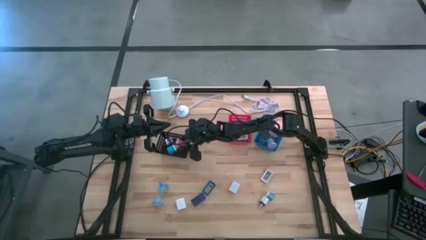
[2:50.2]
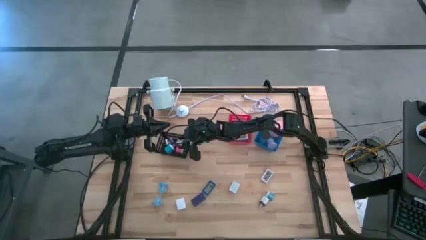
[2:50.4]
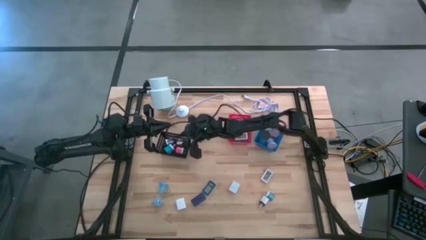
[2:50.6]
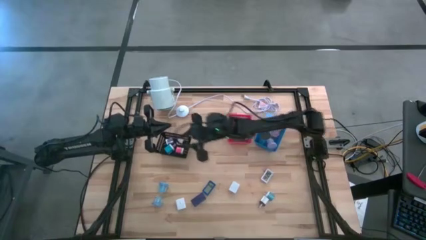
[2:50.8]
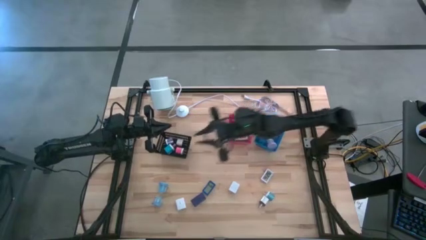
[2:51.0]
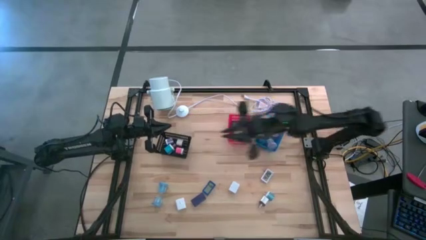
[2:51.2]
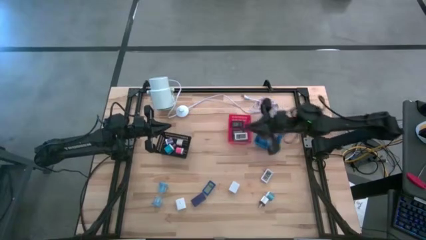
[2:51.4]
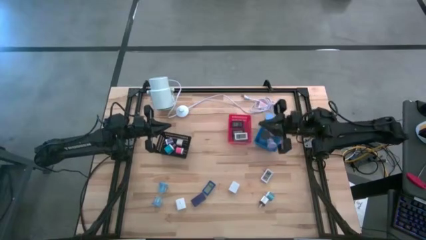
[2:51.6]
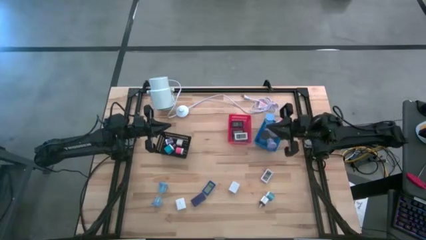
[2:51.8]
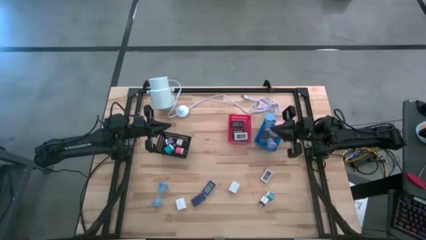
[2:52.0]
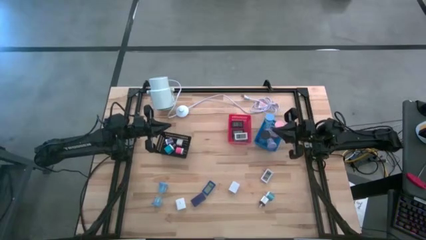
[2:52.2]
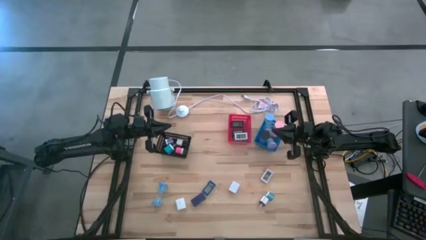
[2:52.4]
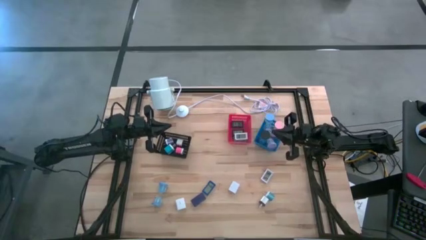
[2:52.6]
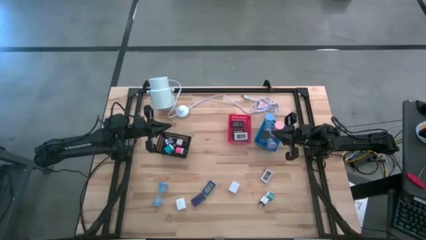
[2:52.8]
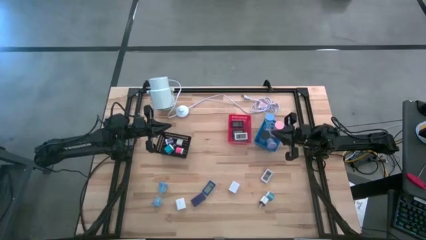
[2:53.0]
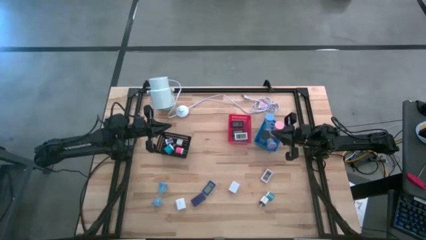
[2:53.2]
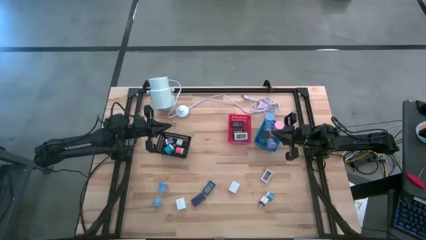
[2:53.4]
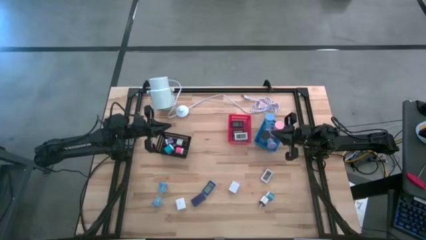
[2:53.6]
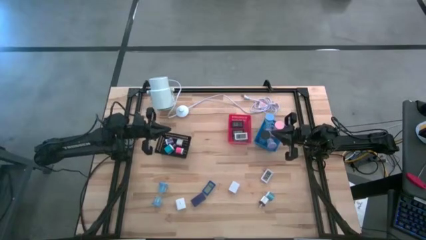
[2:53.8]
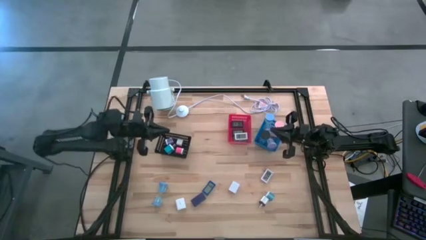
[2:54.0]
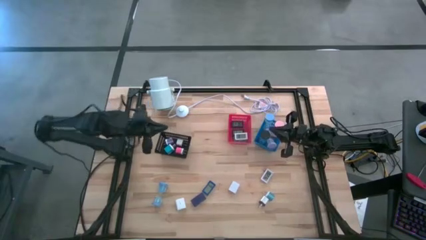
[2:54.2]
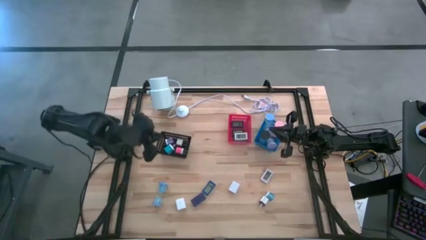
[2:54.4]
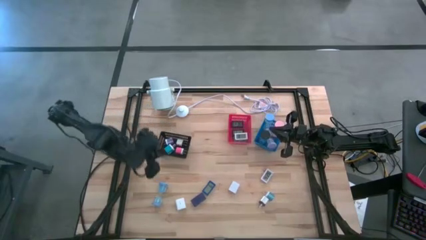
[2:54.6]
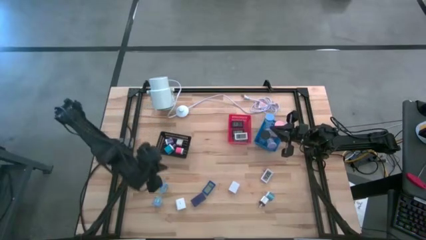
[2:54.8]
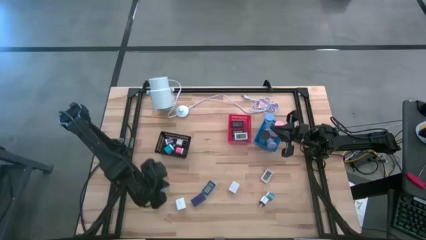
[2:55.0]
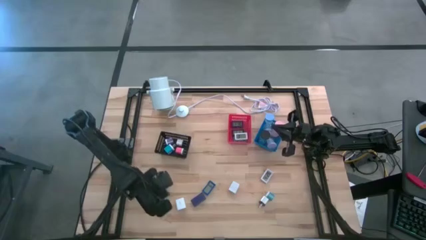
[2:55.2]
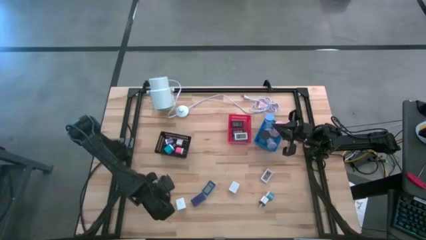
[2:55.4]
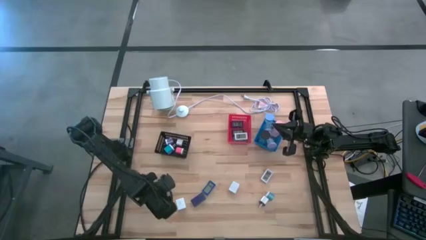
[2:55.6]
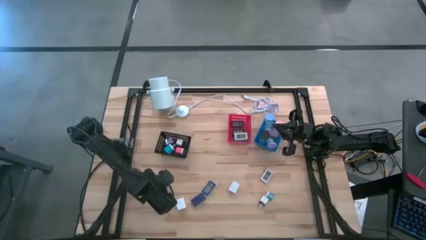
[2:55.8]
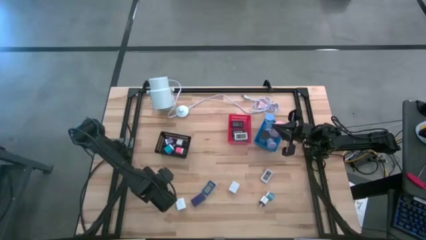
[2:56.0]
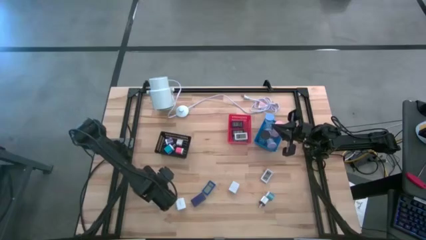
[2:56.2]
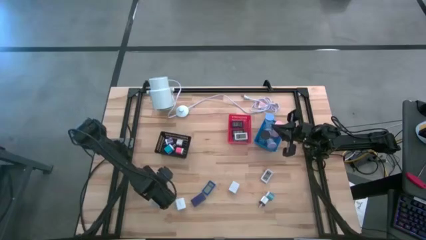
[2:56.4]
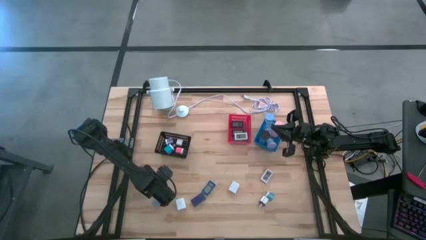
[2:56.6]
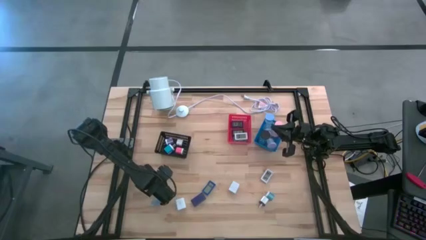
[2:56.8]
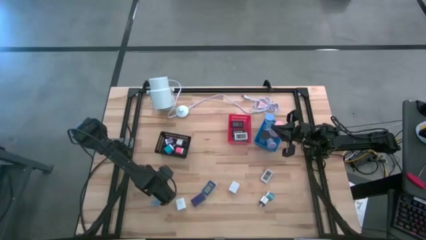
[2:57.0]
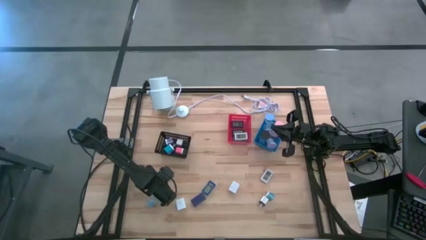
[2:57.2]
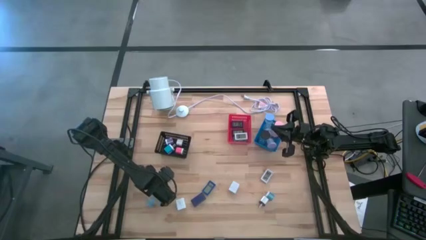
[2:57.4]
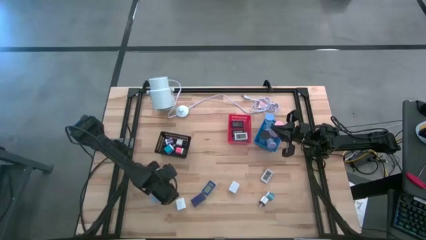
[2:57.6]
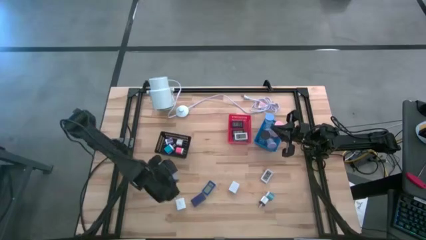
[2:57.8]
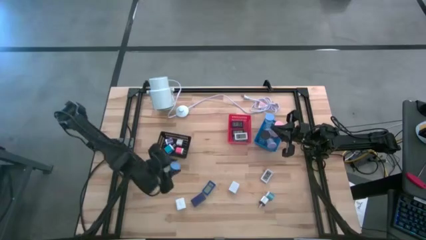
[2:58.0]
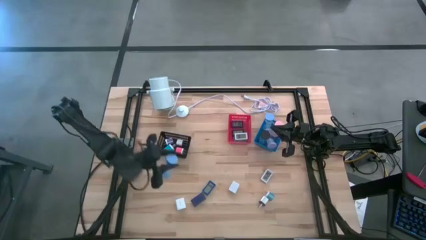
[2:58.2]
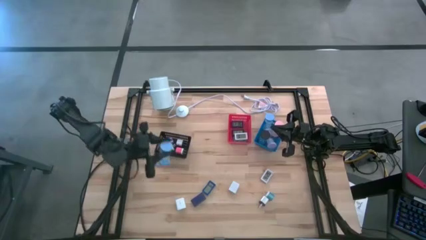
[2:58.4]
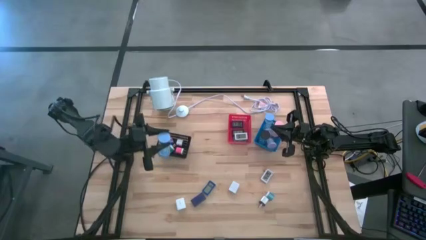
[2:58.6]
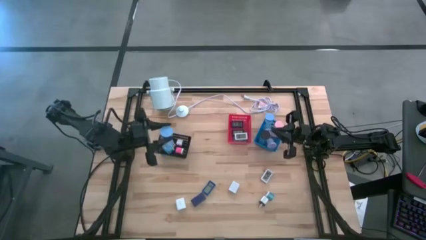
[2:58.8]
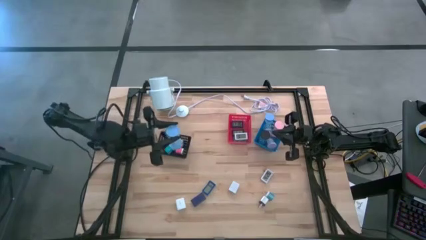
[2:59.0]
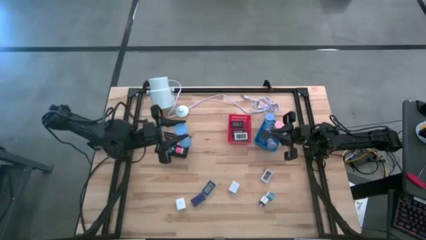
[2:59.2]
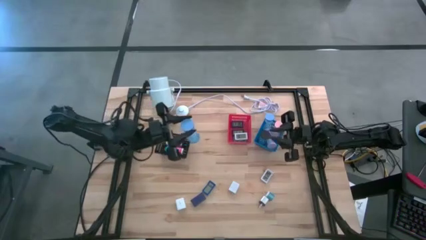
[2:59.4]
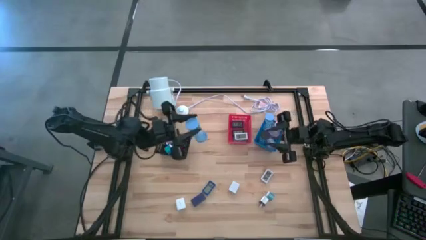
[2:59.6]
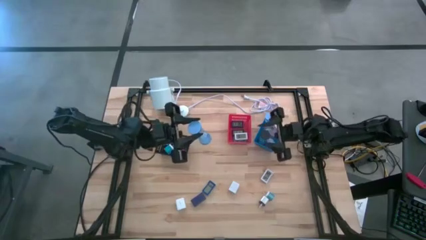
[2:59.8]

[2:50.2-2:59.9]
Task: Pick & Place Office items
Put the light blue hourglass into the blue bin

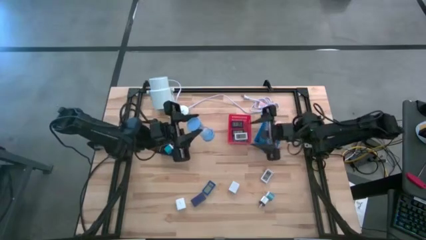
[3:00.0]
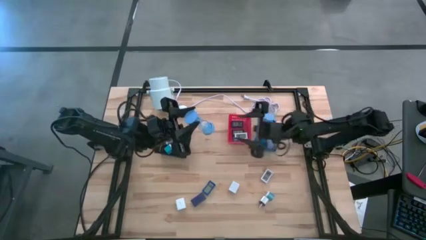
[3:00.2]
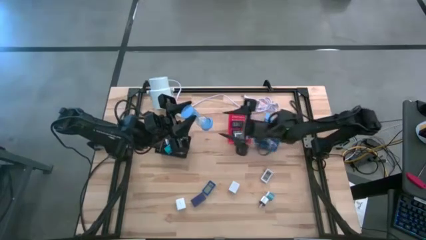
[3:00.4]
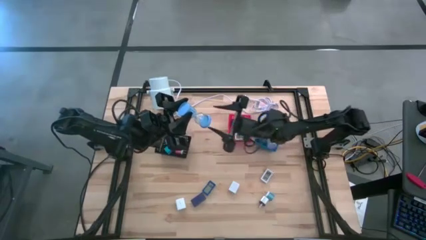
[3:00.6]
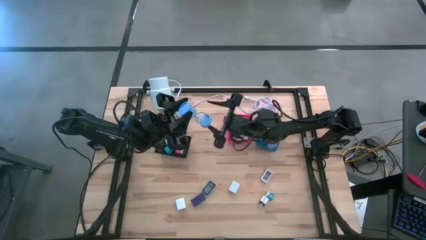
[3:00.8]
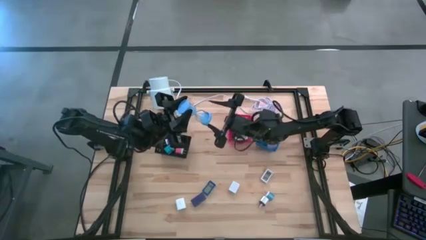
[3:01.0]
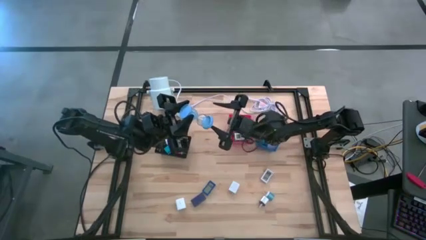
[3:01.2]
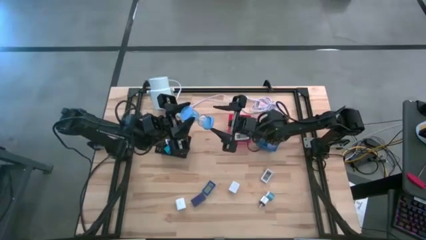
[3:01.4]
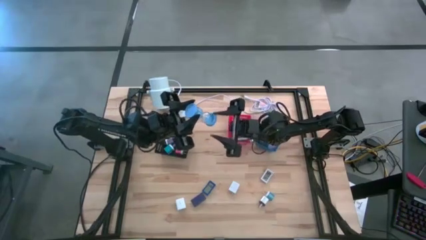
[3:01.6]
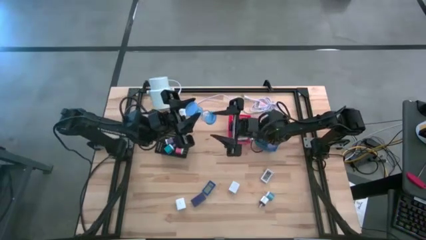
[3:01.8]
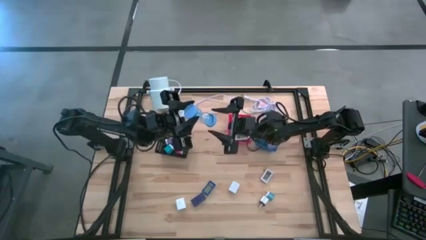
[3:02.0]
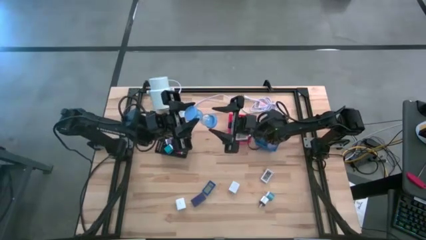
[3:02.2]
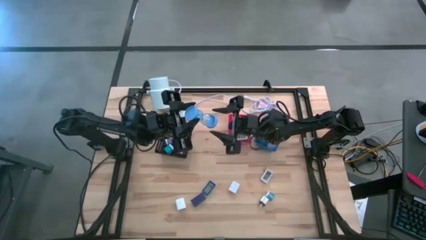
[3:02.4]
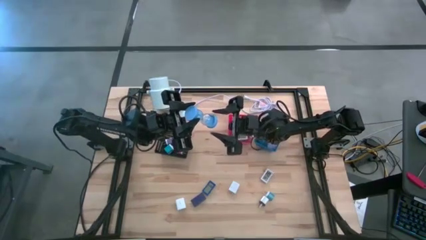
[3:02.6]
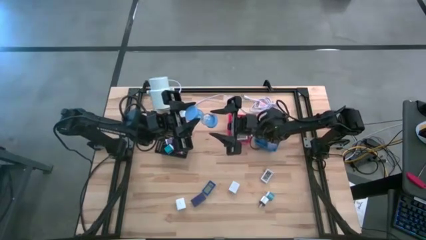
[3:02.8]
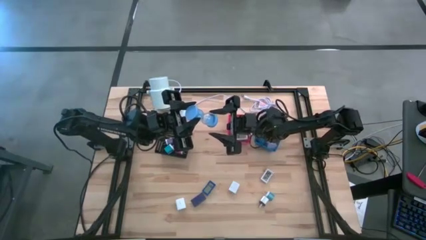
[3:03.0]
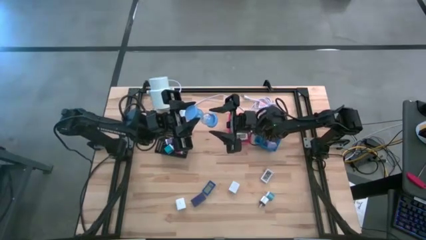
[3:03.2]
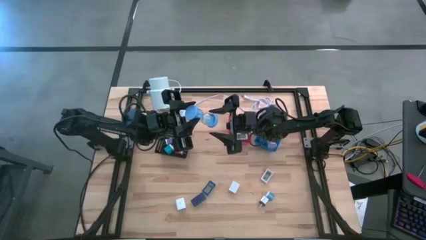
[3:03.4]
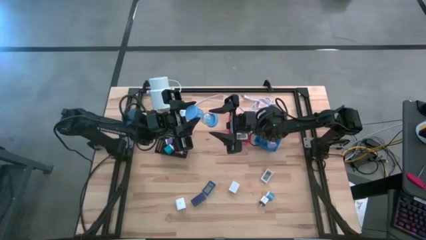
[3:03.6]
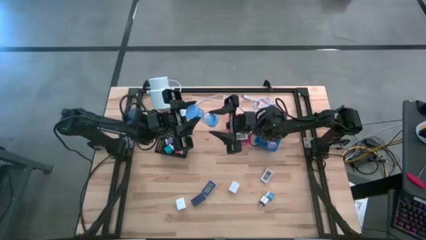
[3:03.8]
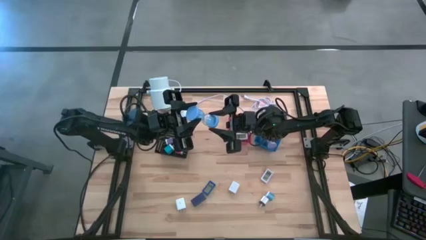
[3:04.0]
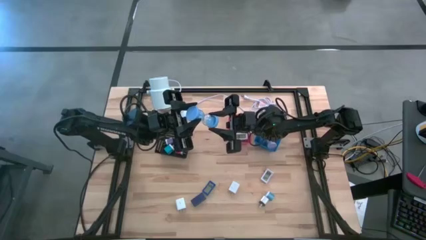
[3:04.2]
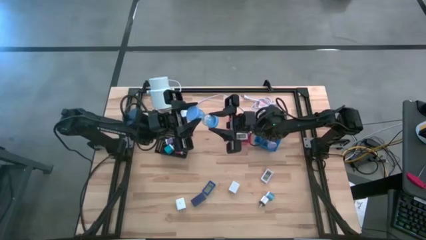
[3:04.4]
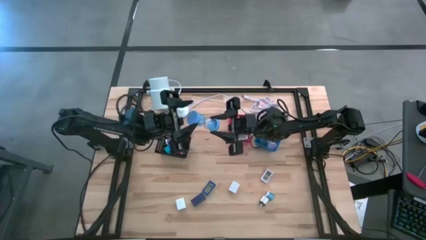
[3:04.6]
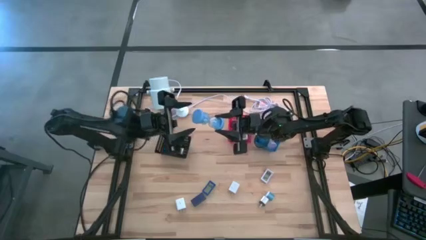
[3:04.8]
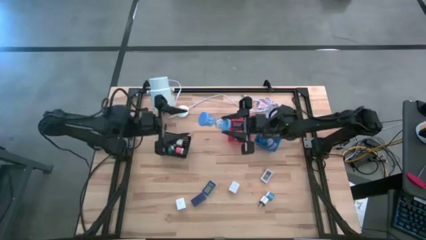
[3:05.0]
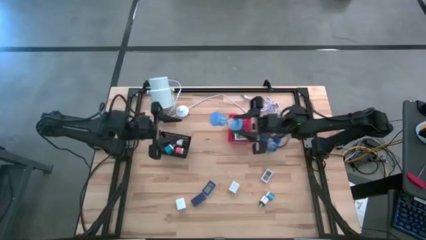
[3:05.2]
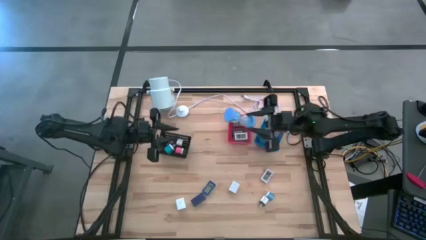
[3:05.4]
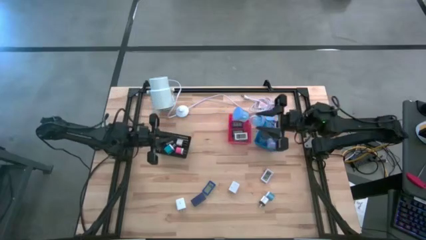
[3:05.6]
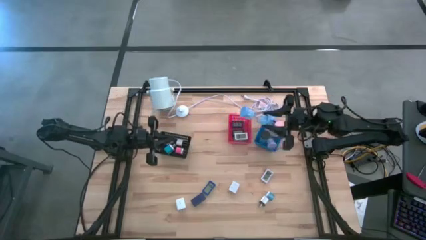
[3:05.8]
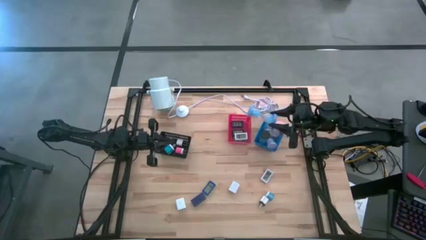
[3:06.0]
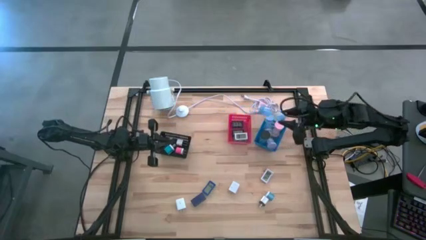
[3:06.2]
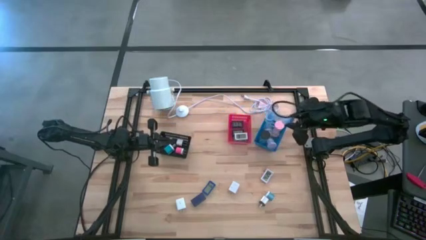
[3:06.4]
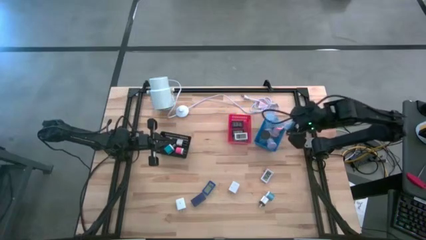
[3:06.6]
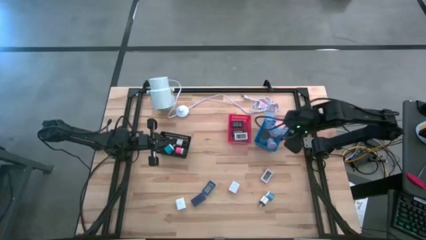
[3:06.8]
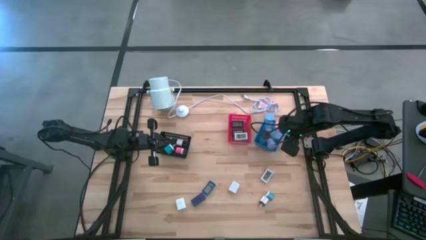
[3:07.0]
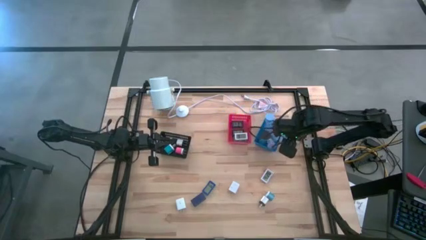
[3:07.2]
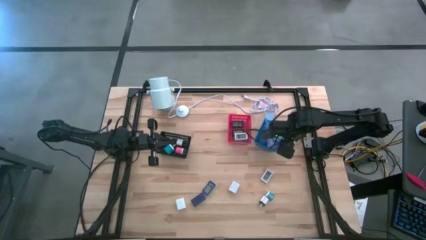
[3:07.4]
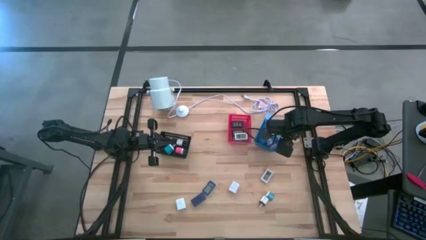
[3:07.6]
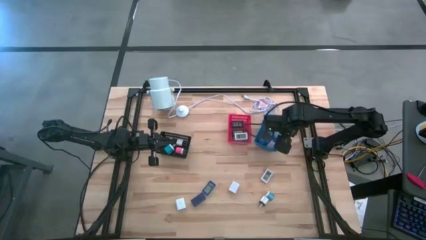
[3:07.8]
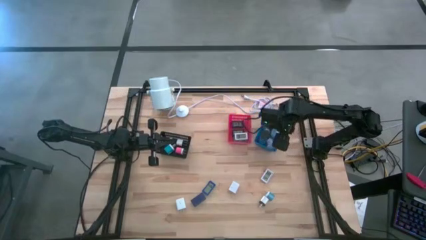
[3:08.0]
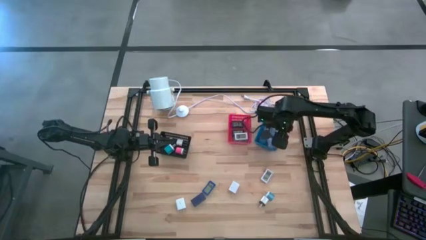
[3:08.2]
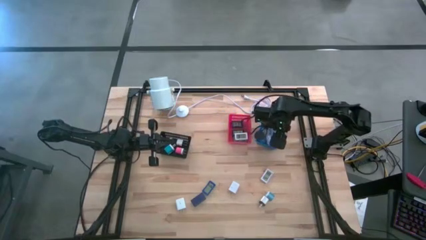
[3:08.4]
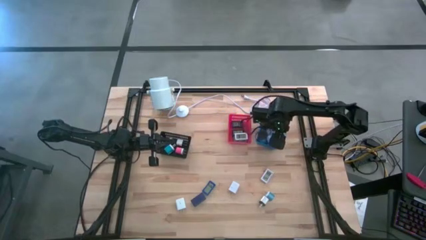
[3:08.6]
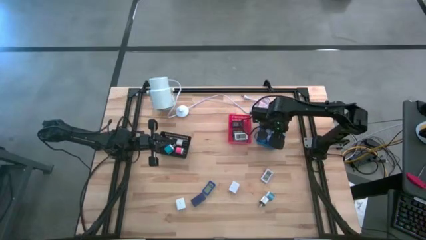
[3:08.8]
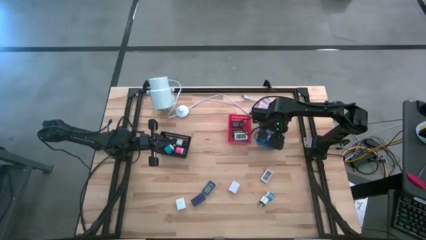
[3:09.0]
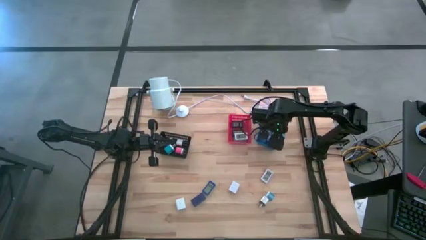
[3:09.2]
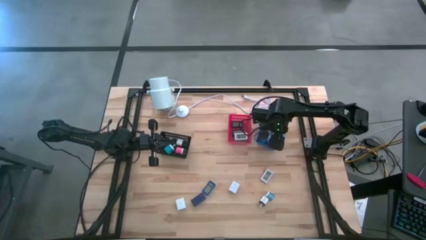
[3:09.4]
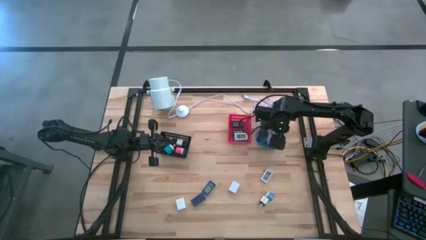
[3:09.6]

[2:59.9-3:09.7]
Put the light blue hourglass into the blue bin
